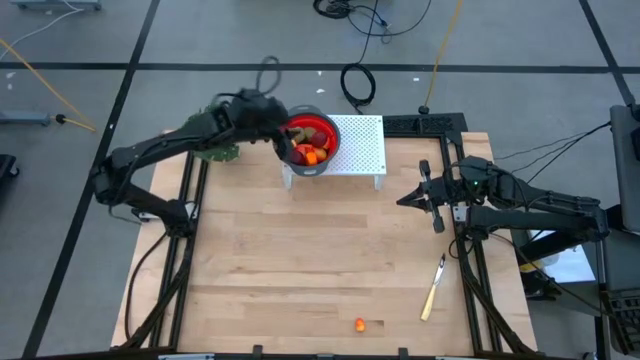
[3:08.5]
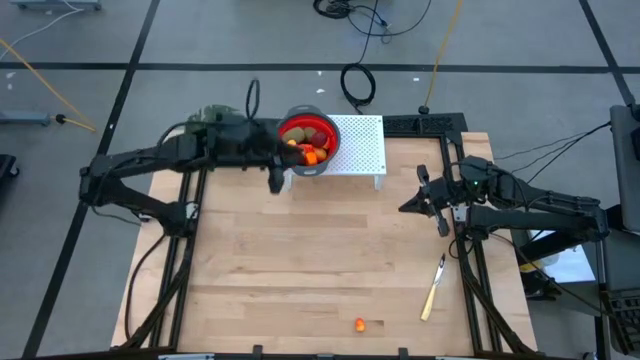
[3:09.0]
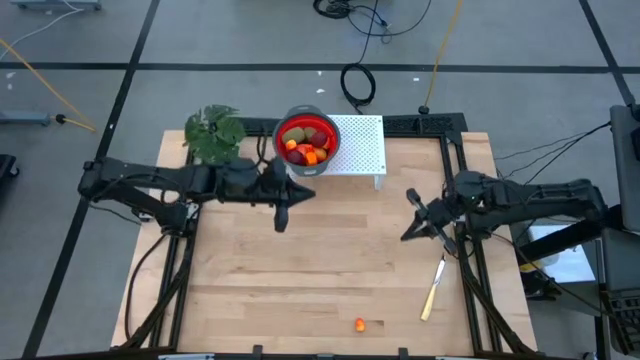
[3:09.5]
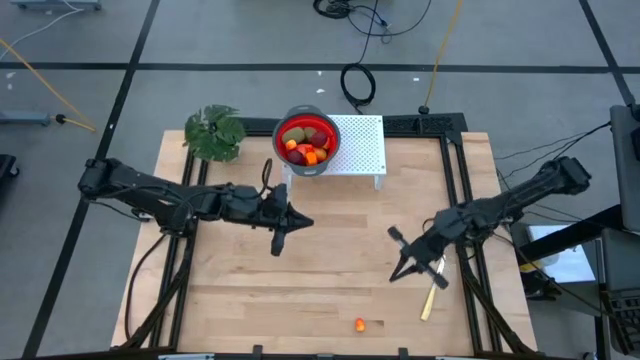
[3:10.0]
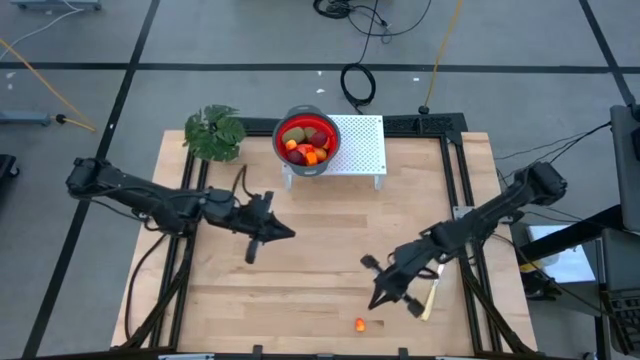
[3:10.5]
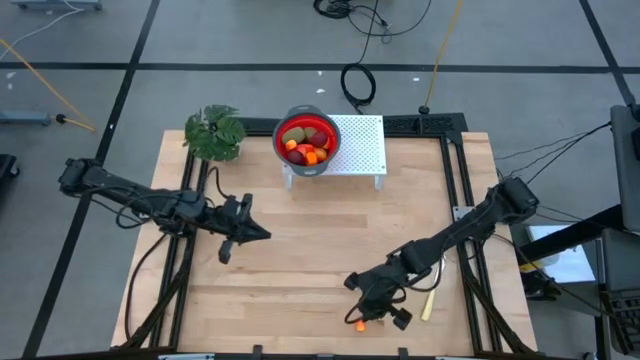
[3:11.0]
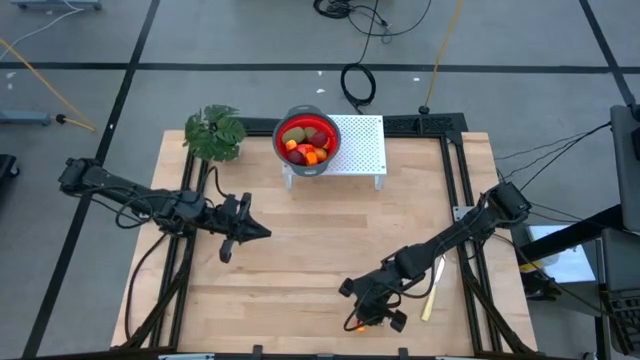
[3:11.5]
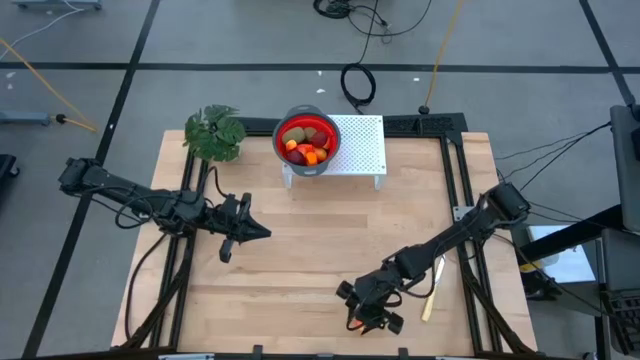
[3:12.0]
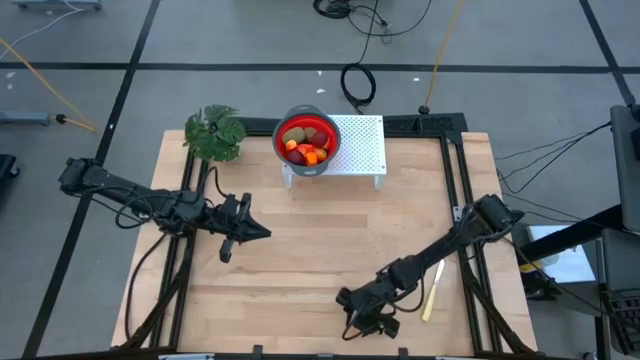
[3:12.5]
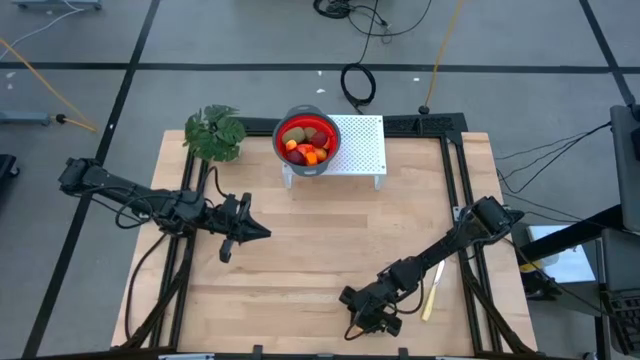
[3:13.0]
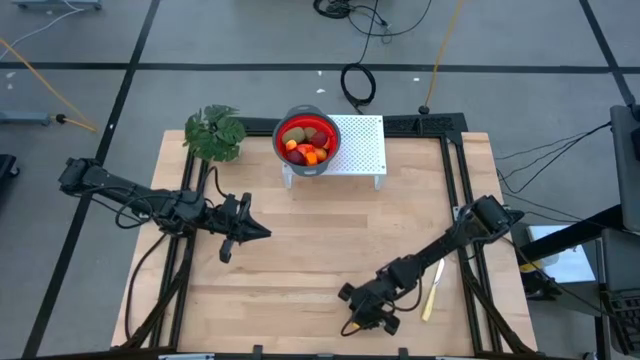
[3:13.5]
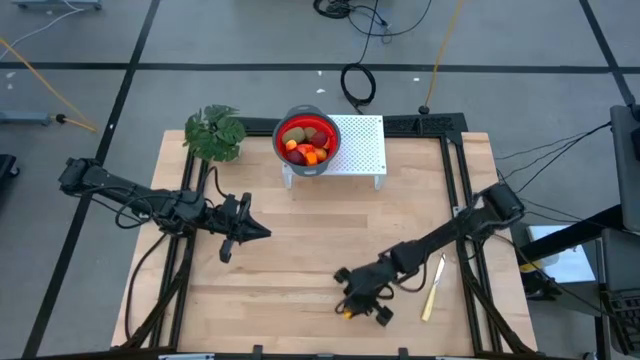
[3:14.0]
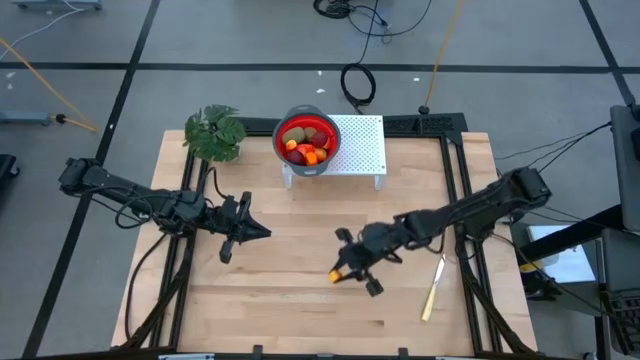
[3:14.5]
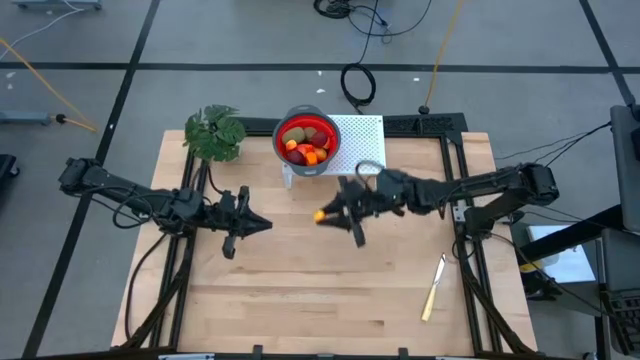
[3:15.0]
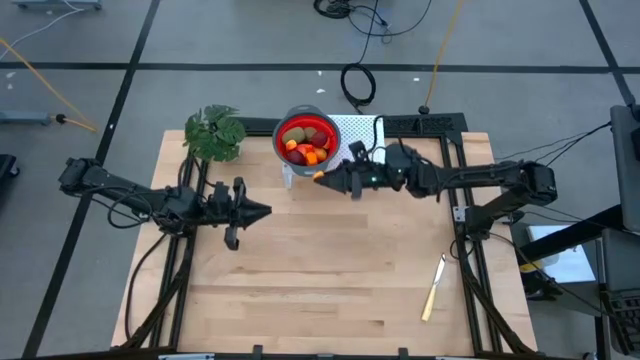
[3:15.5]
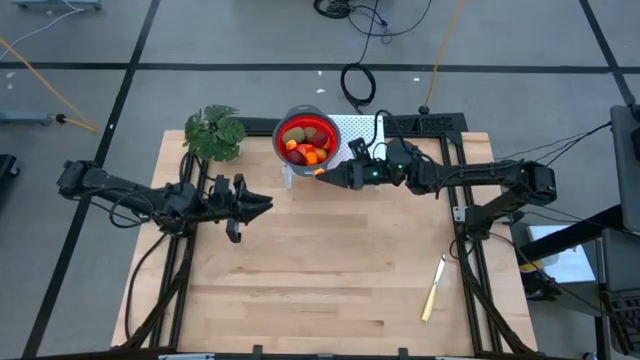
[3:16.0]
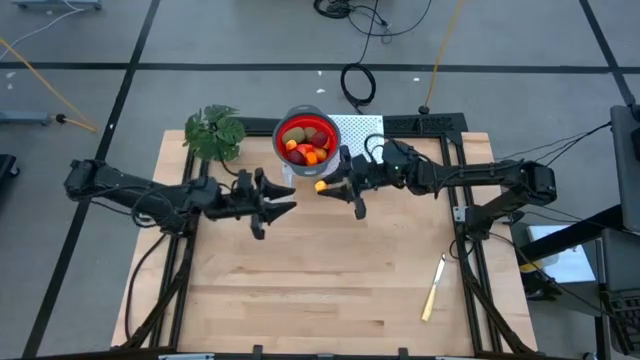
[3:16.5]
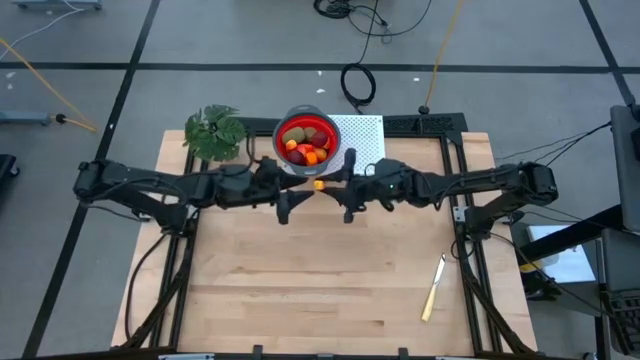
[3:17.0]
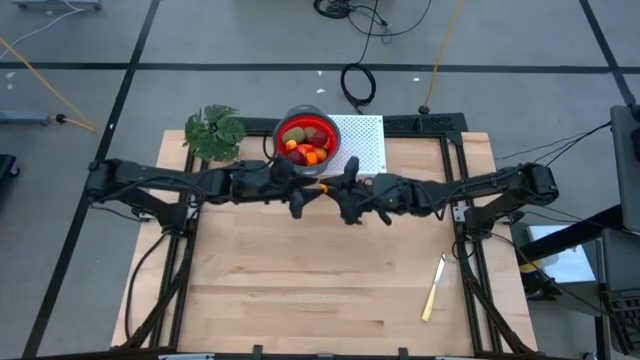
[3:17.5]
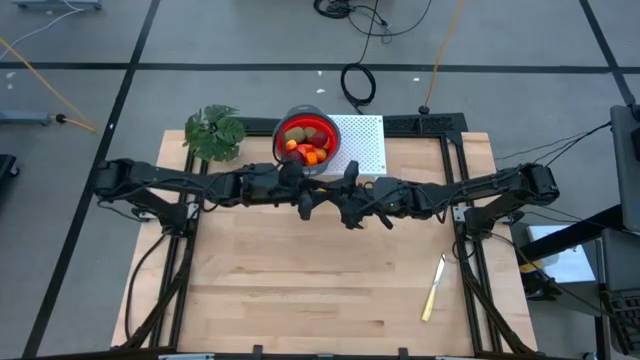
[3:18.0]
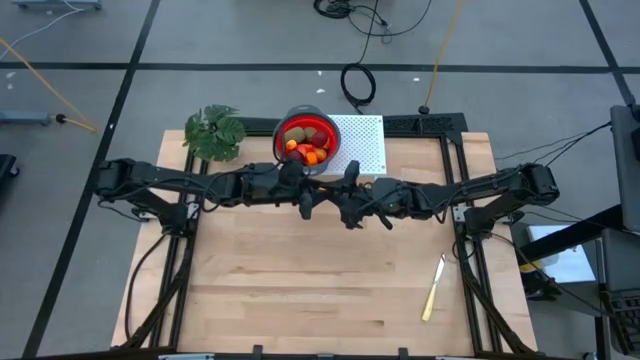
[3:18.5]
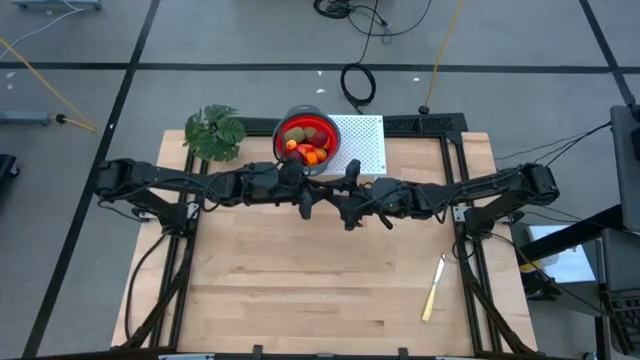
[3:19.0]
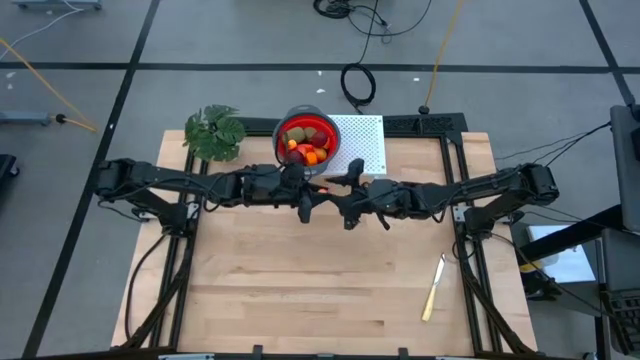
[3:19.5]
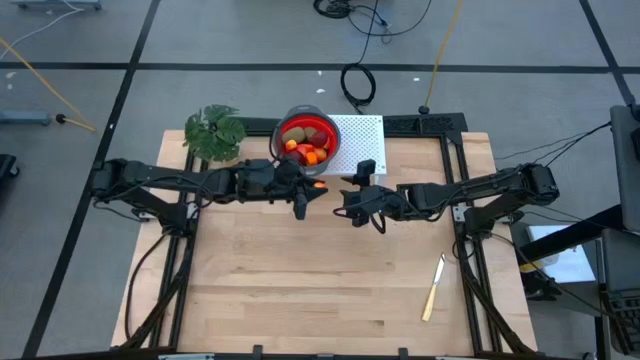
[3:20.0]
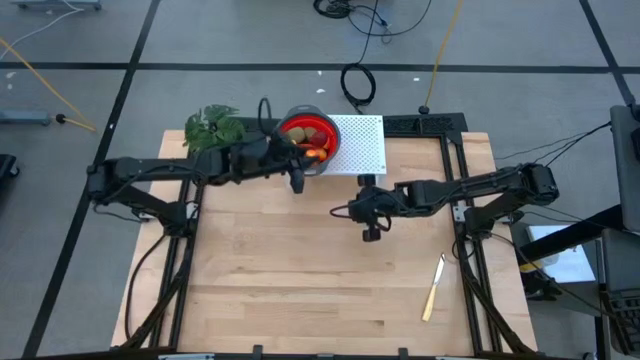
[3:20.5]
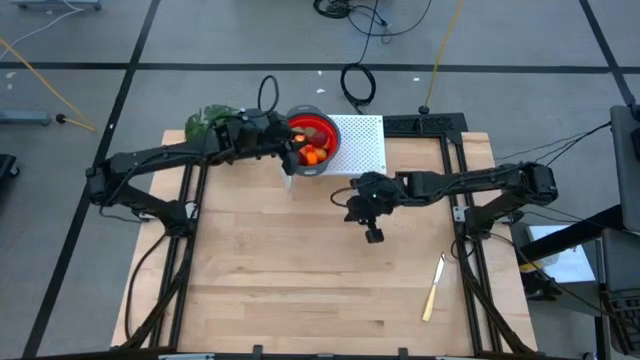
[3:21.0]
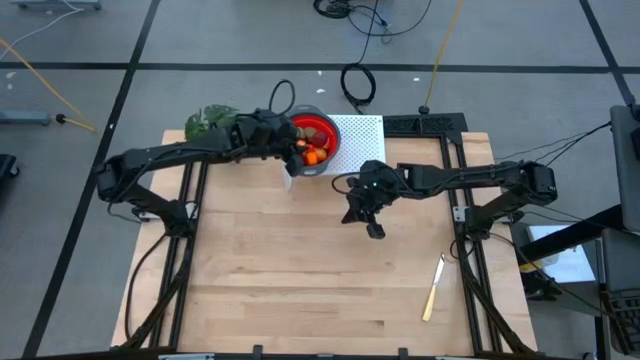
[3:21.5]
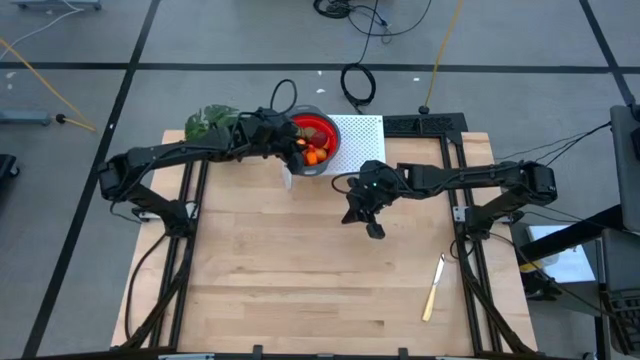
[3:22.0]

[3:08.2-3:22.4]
Task: Pick & Place Fruit
Put the peach into the red strainer bowl

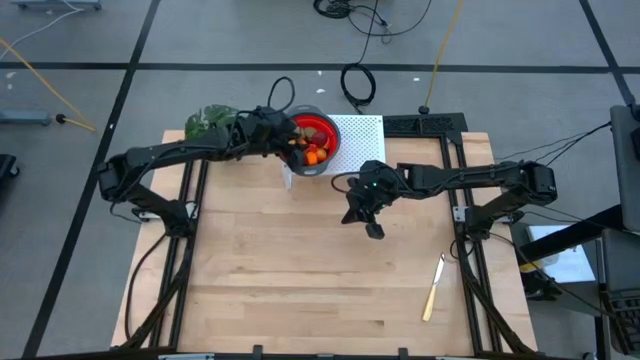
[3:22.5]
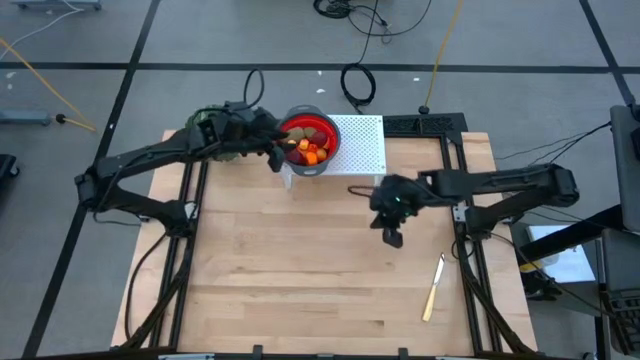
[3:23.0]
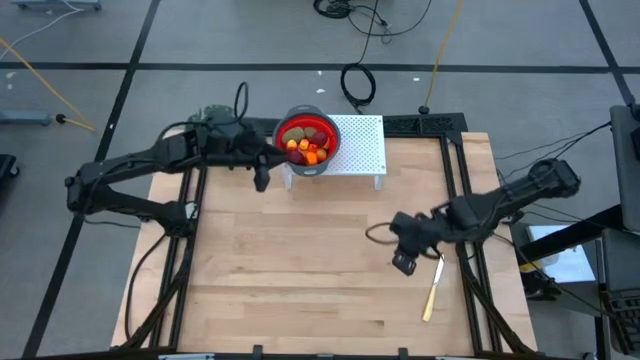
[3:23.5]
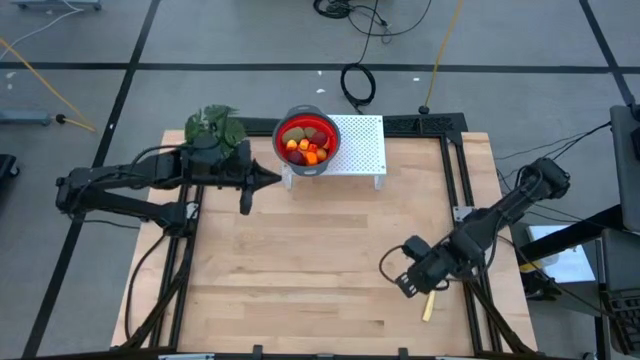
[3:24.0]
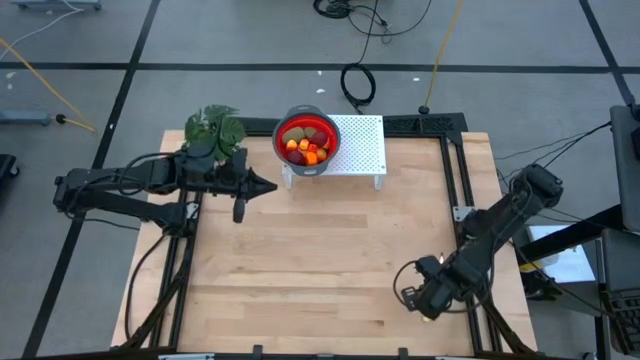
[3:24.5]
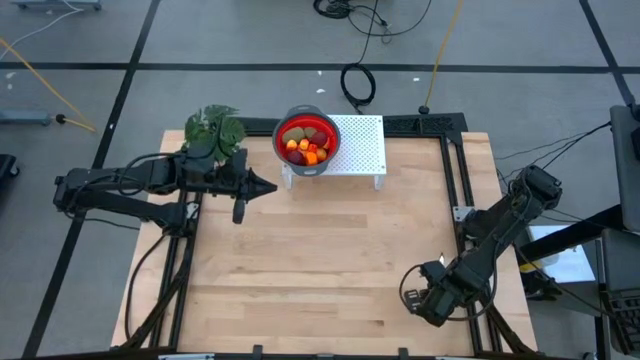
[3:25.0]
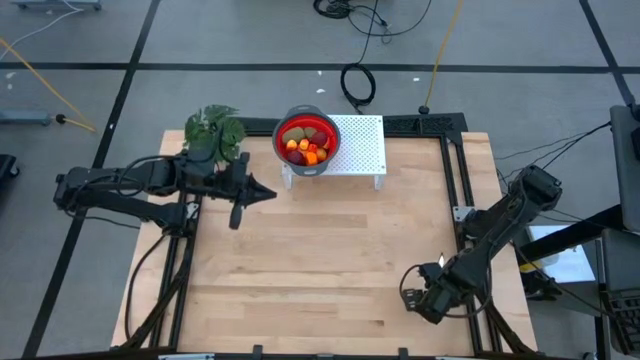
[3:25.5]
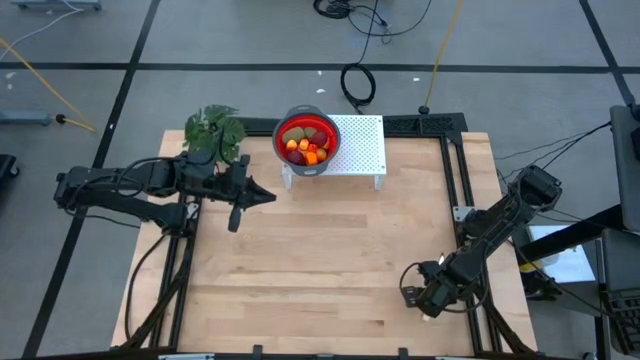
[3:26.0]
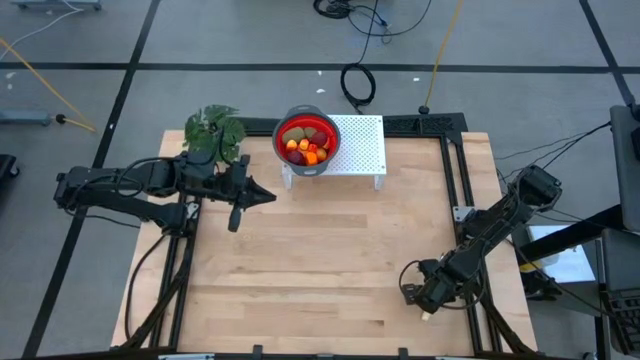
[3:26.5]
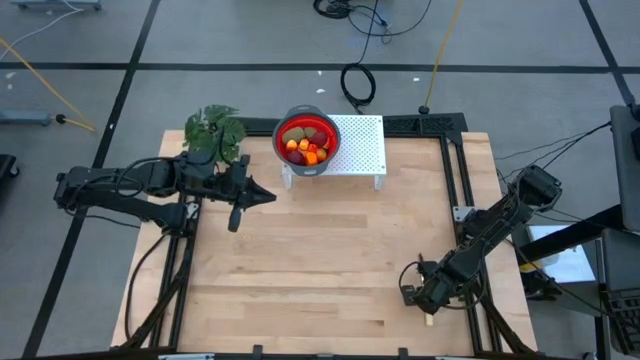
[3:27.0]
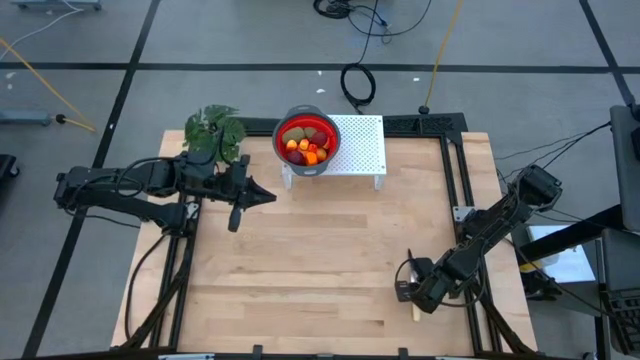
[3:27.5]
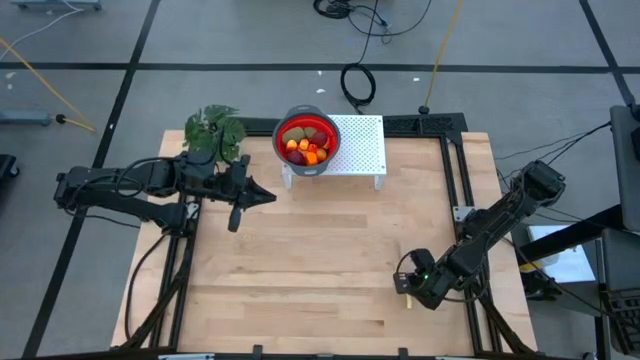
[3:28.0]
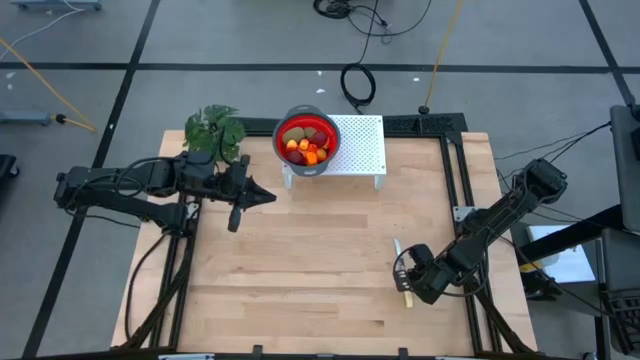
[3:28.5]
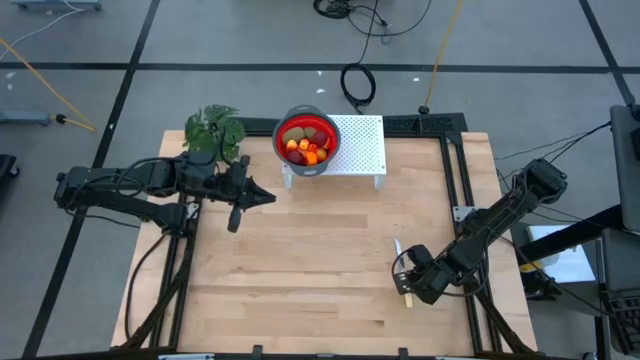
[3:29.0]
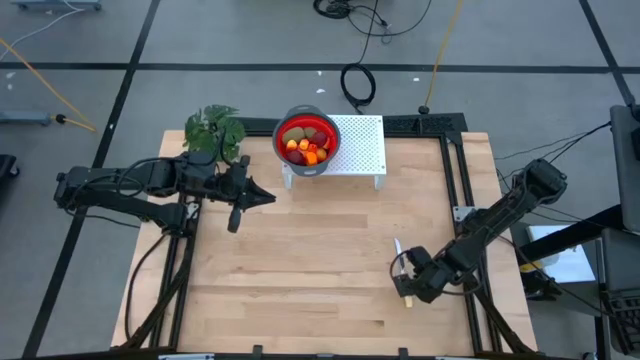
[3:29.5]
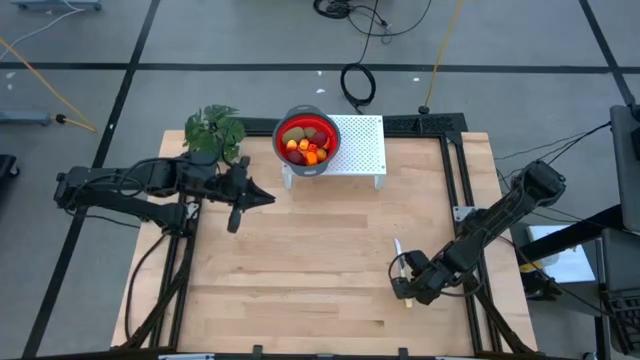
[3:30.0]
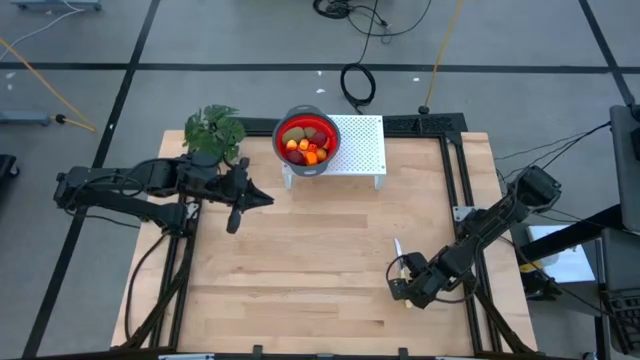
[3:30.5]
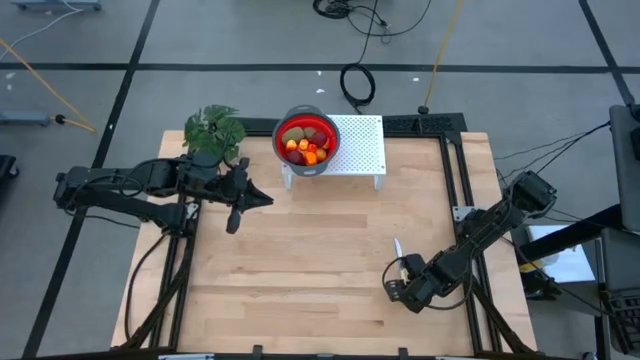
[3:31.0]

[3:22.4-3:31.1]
Put the yellow table knife on the shelf
